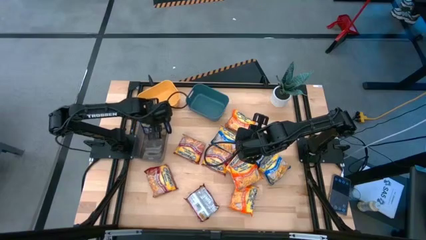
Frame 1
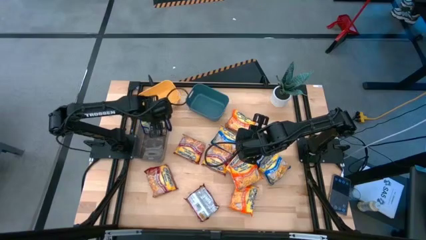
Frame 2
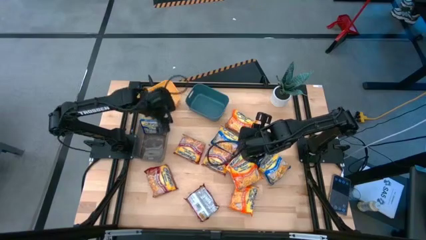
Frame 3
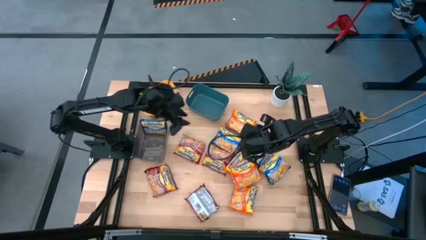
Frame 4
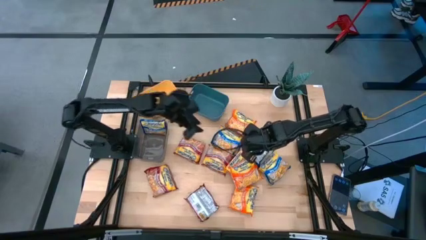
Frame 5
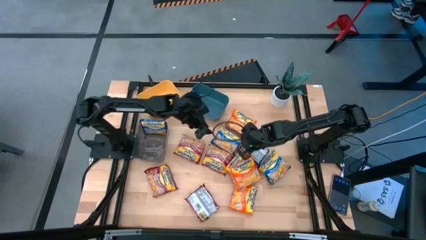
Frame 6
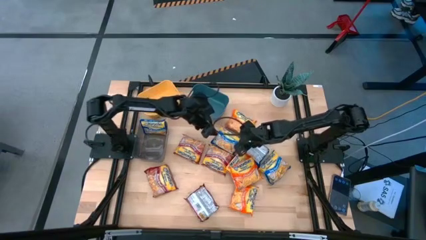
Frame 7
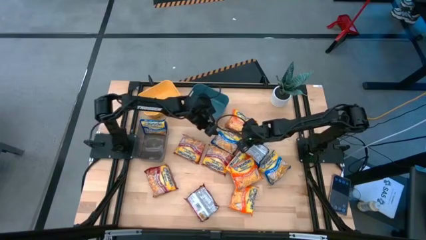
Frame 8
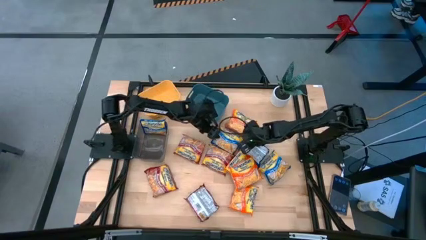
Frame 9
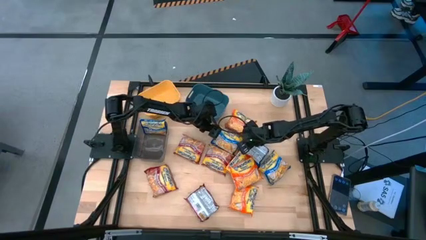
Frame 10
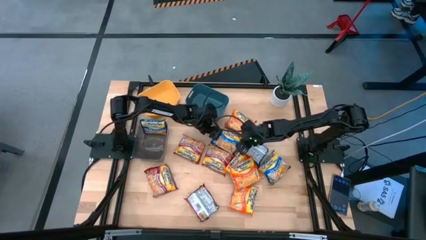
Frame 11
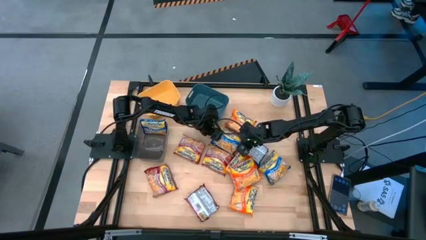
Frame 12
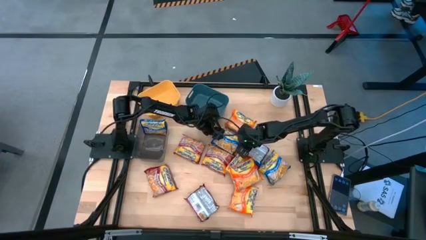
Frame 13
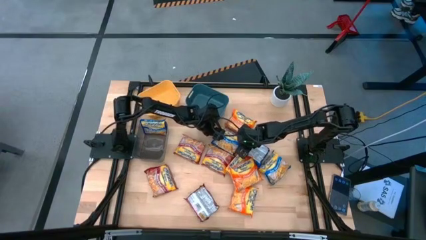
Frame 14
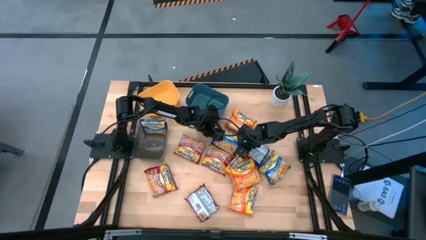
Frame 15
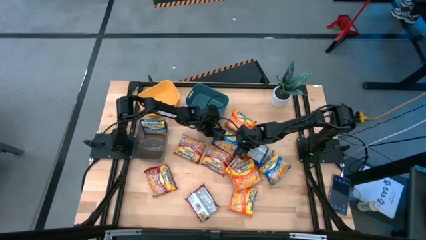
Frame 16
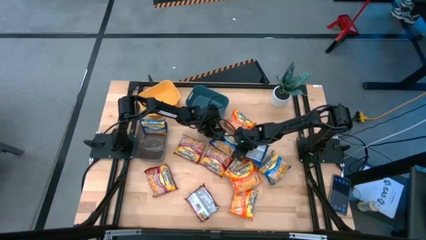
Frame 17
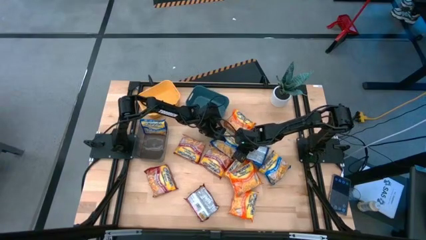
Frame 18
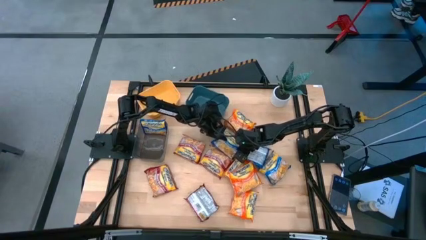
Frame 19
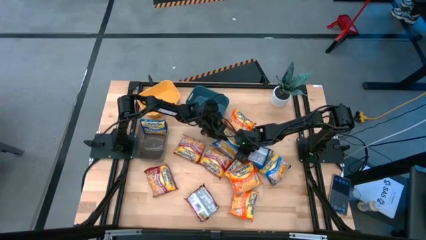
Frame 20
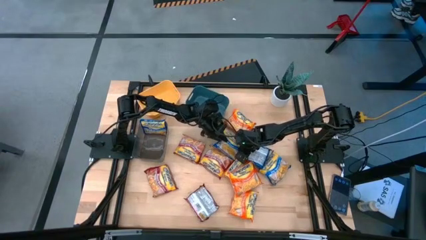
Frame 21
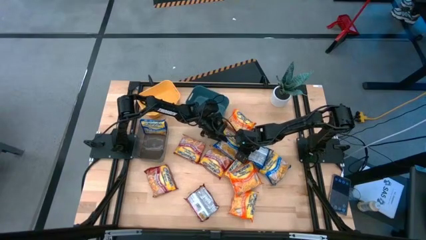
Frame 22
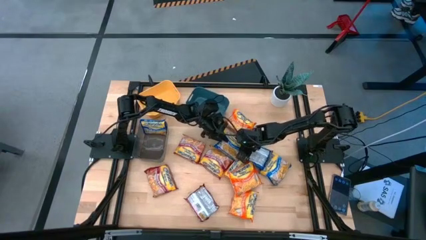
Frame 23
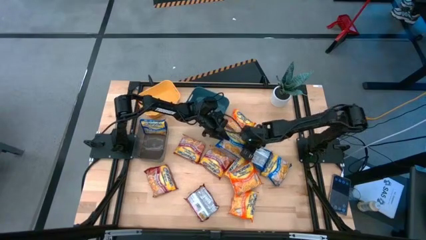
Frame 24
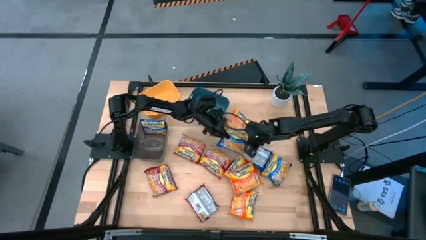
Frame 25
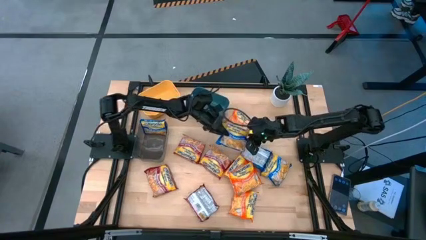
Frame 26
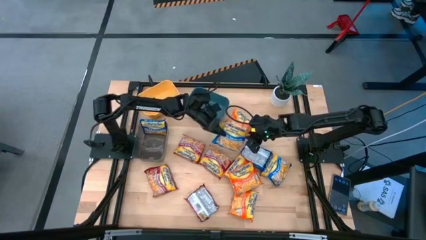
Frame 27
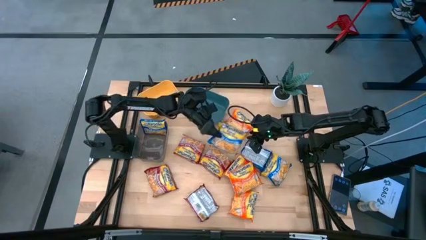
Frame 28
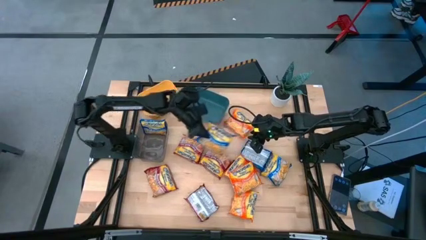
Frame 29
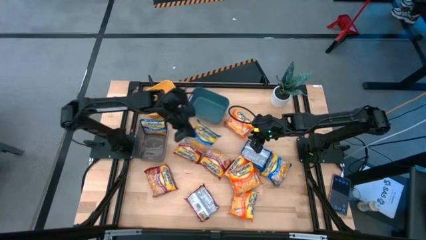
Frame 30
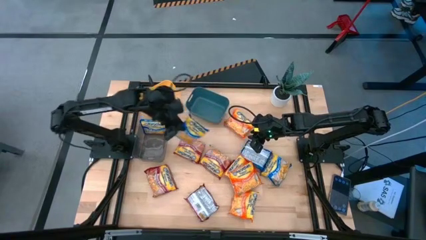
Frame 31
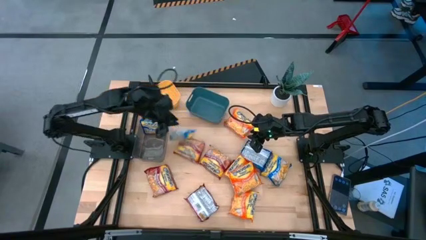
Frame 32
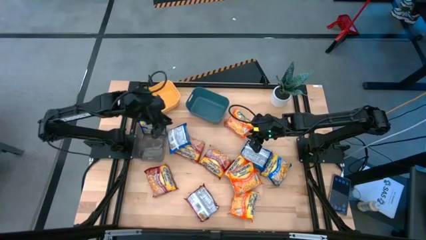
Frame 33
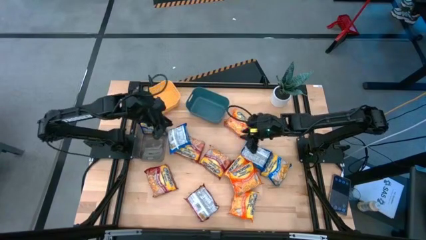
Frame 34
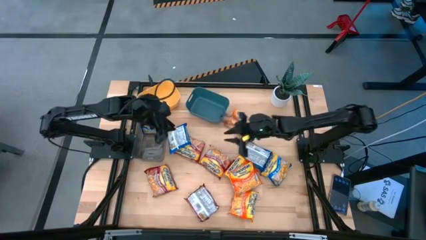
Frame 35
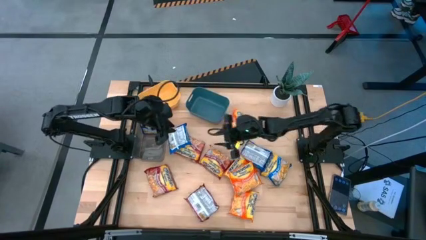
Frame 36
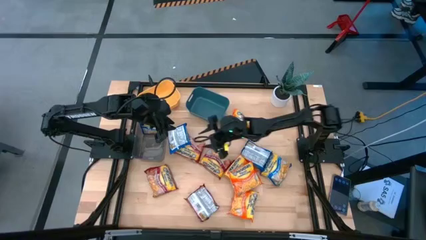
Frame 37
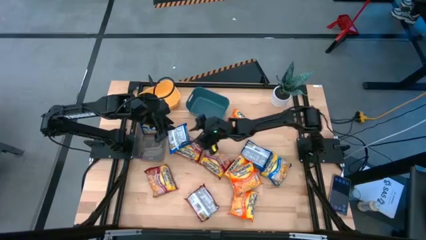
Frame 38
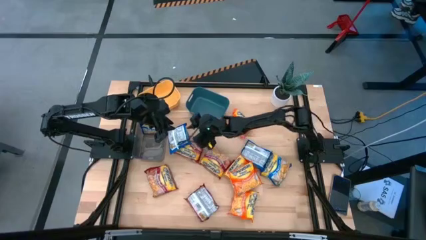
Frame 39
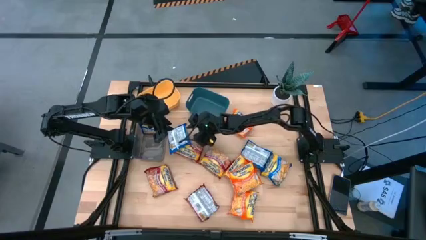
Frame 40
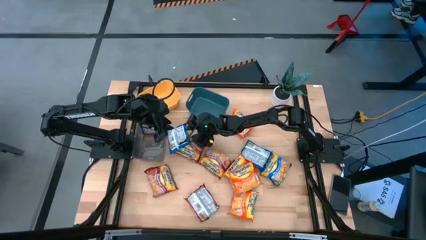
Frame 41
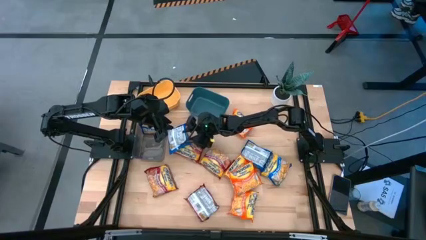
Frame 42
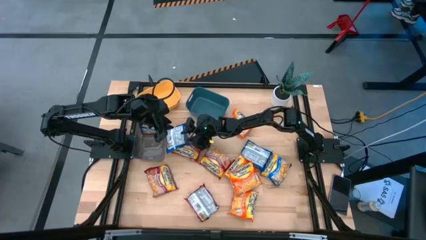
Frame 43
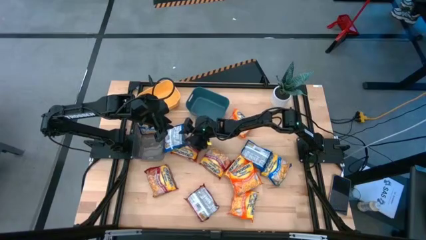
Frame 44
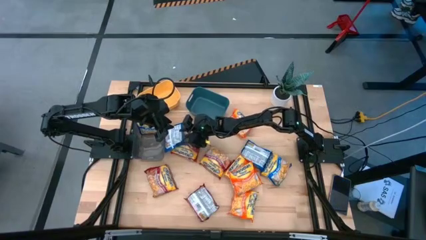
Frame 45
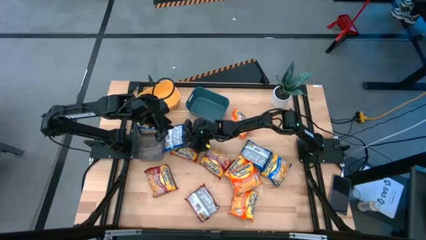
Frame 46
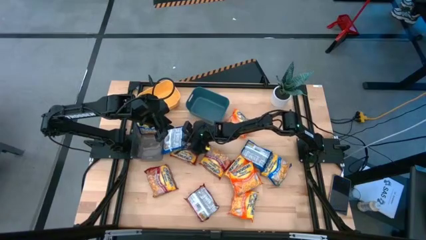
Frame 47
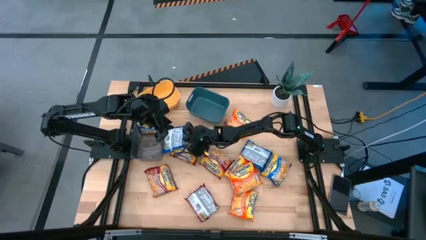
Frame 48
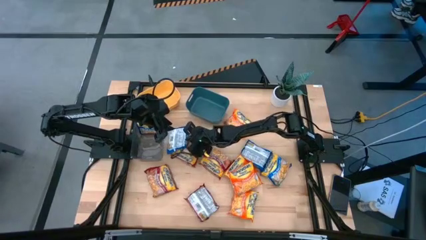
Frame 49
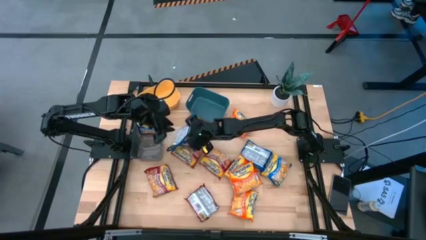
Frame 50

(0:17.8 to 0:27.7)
Task: Sort Maruchan noodles
Put the blue noodle pack into the black bin
